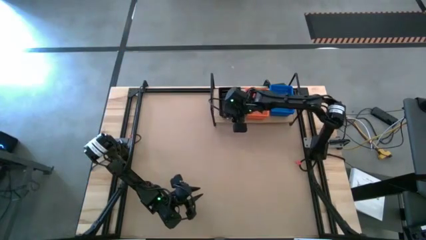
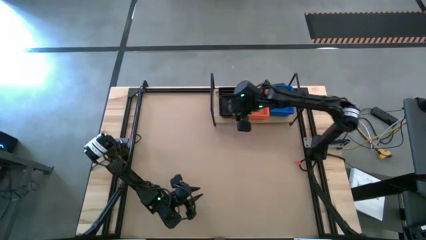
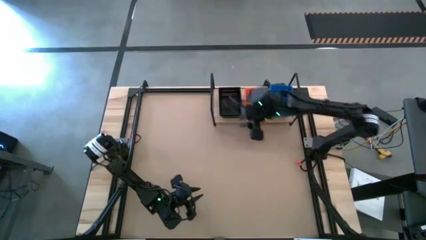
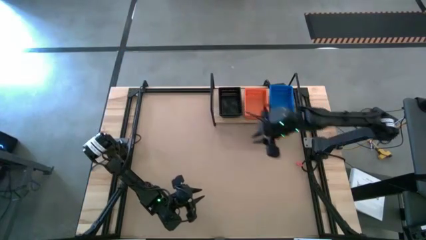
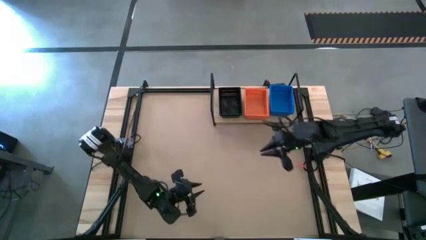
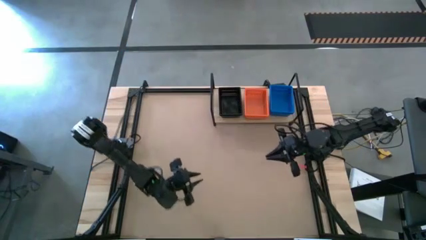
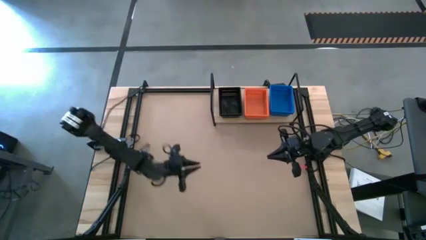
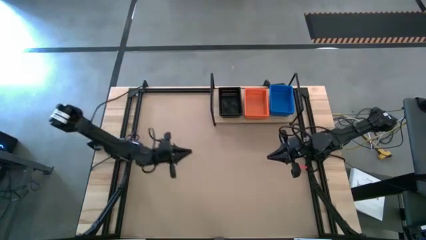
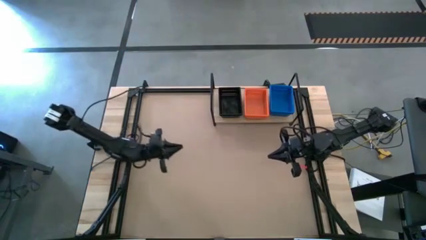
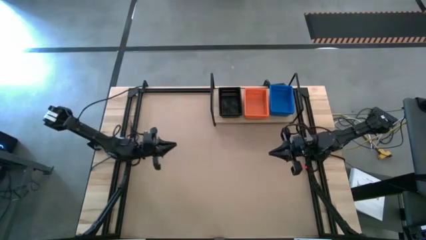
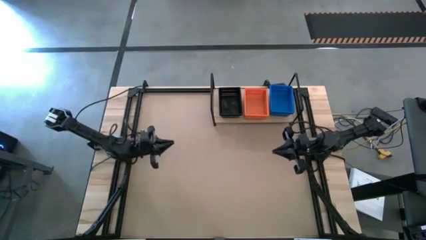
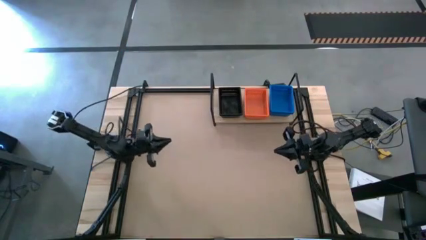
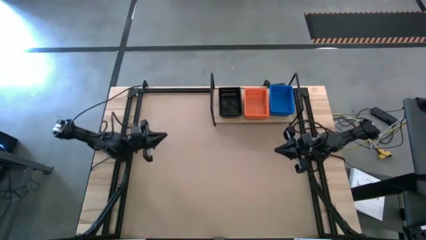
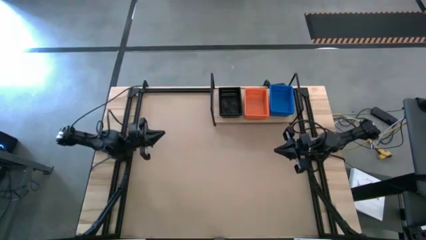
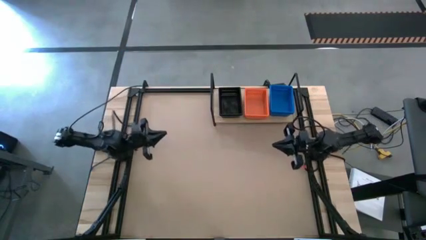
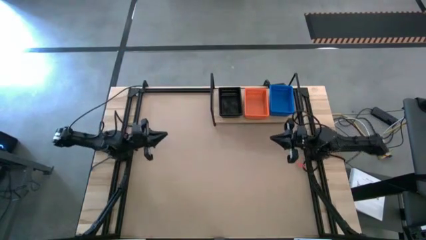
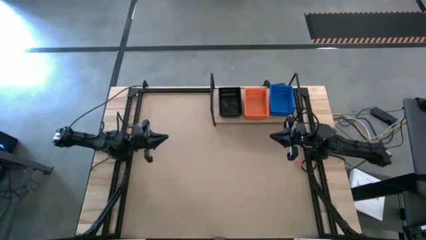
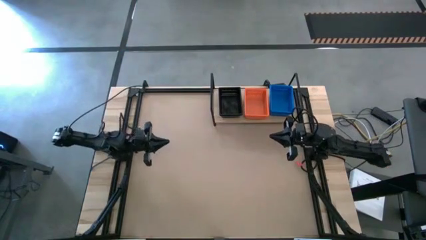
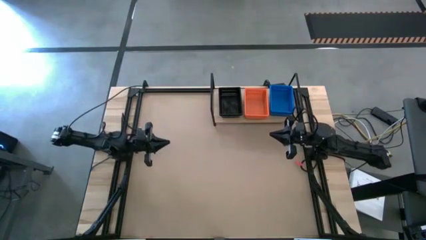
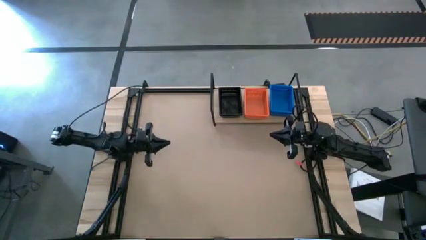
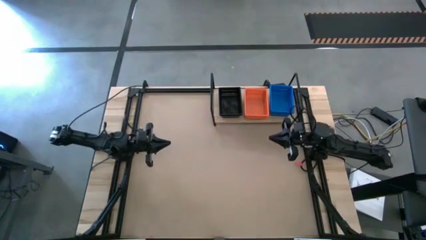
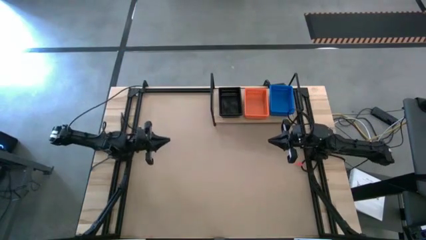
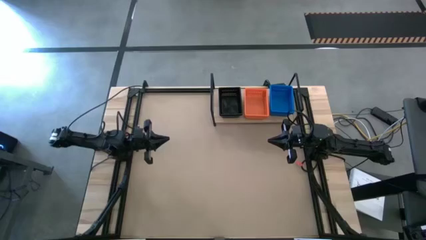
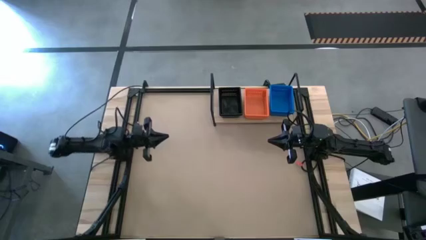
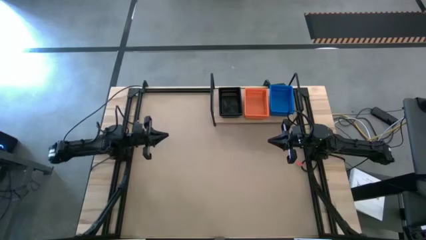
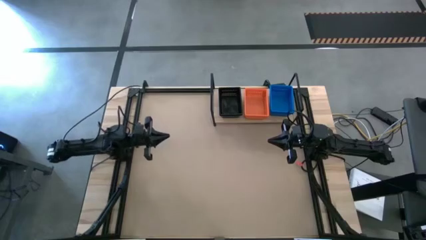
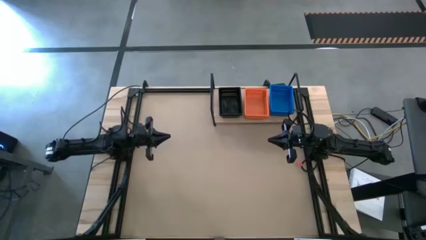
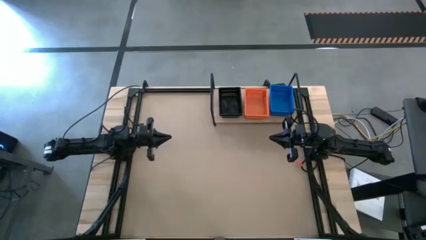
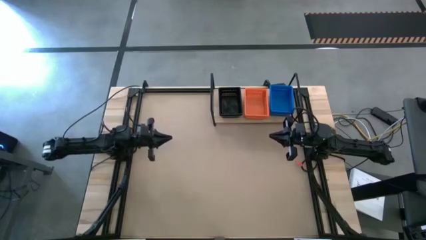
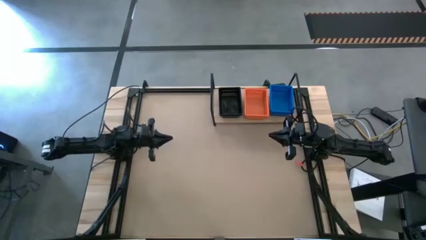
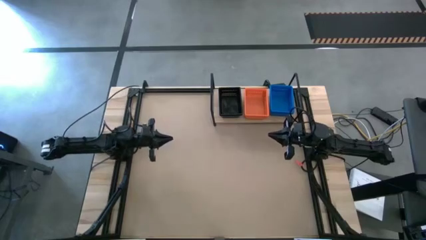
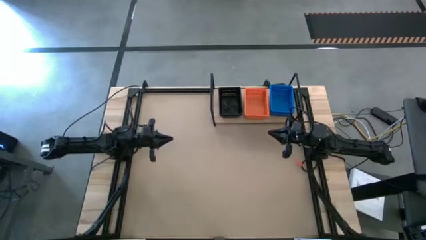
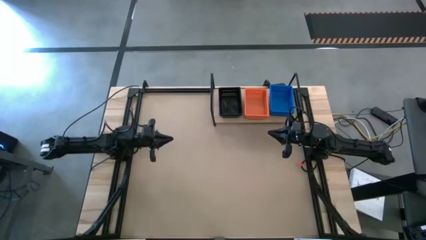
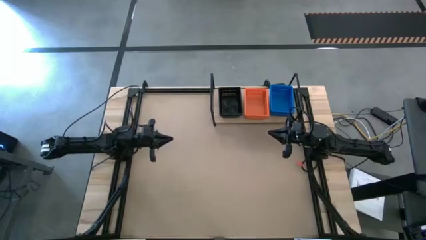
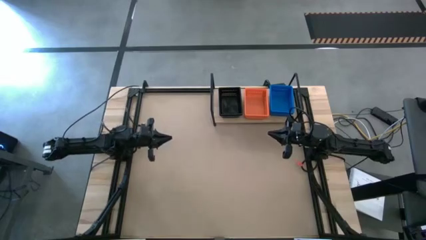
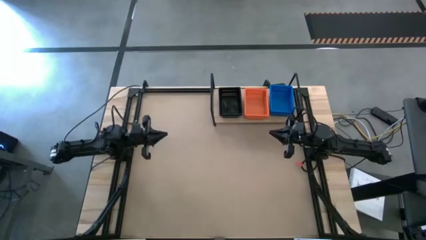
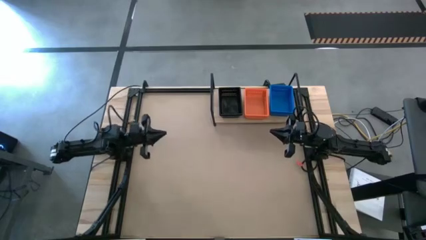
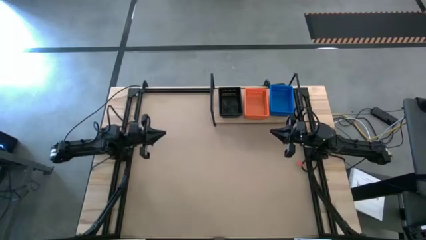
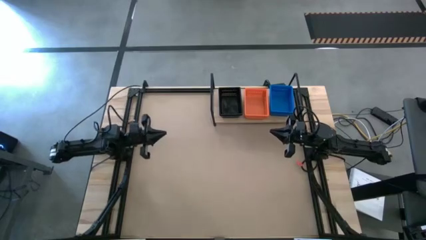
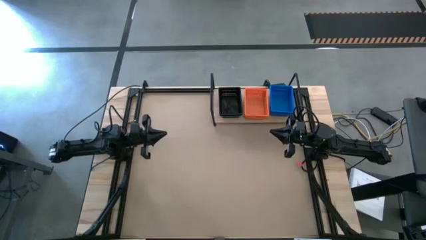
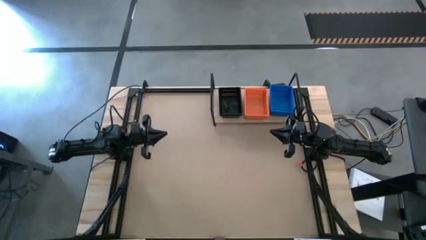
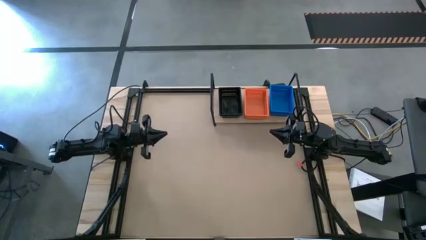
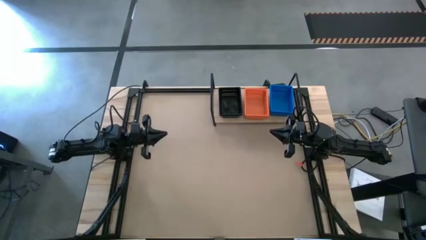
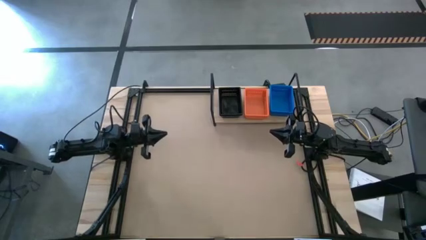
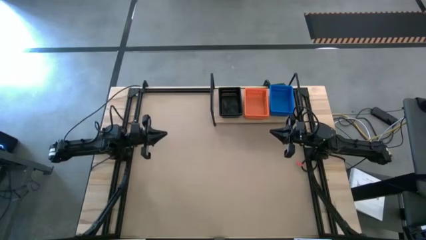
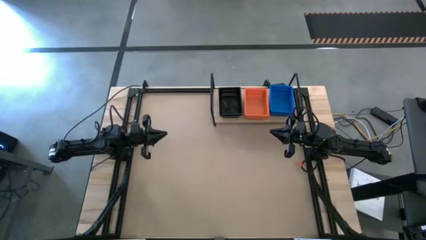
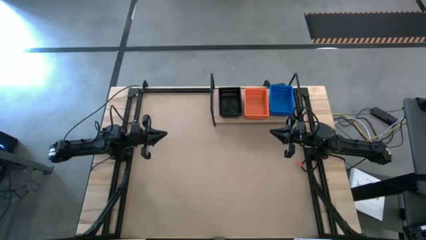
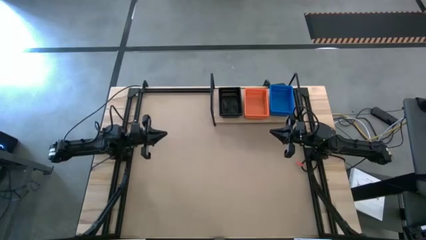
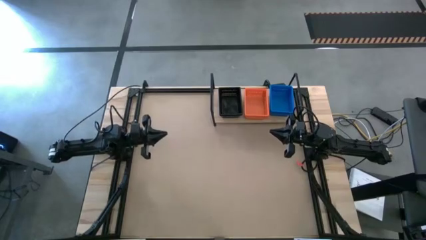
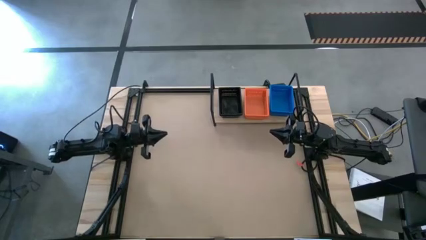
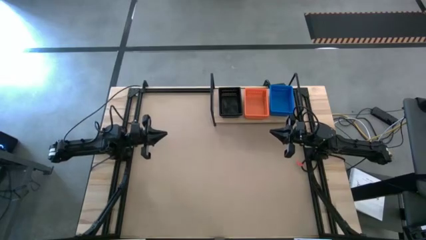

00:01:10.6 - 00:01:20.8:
Task: Stack baskets on shelf by color
Return to Home Position

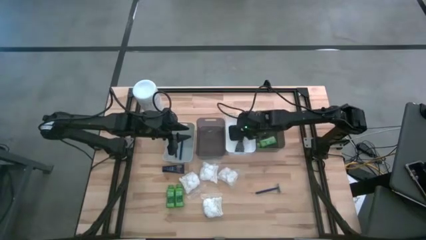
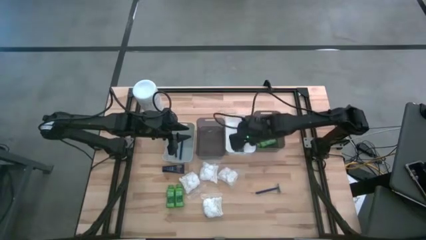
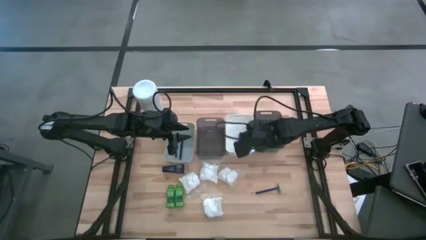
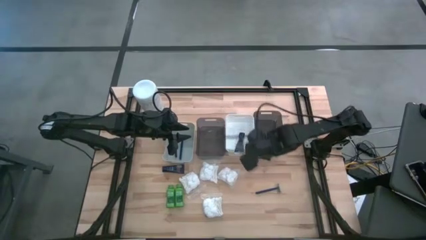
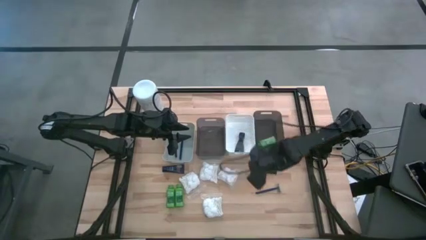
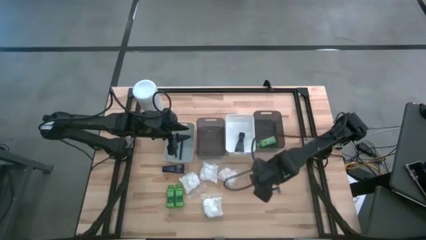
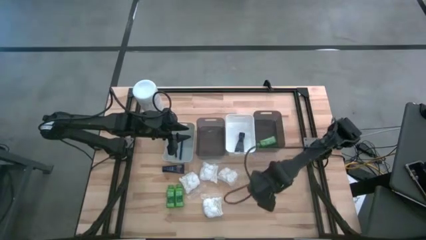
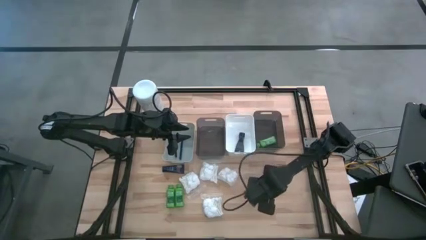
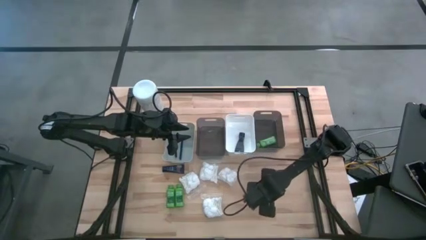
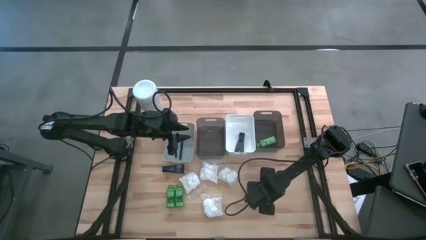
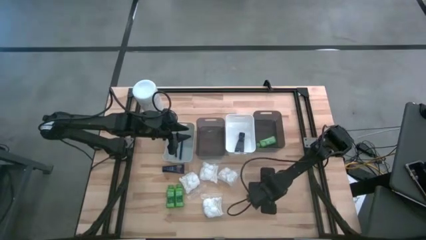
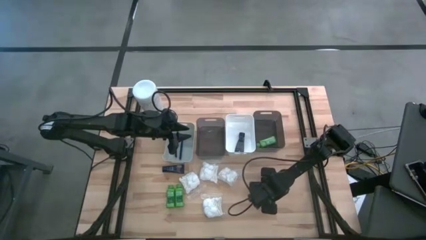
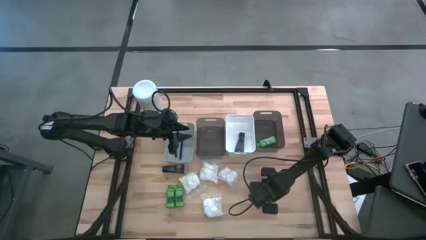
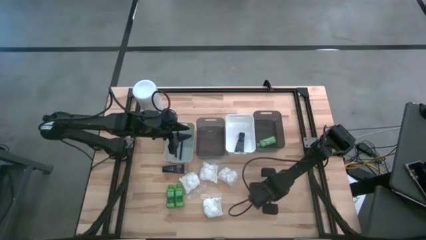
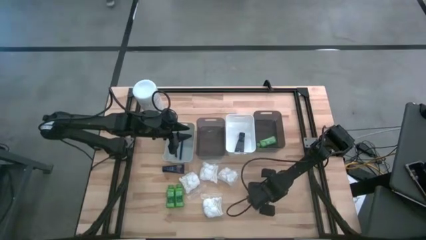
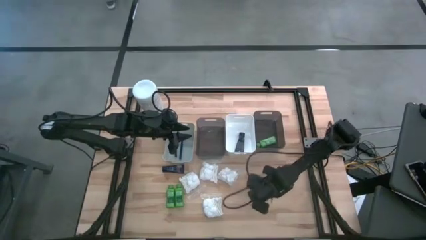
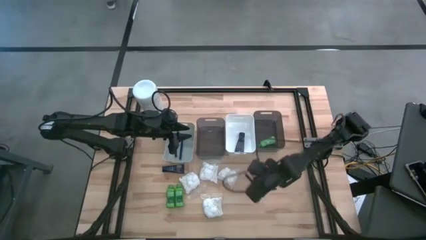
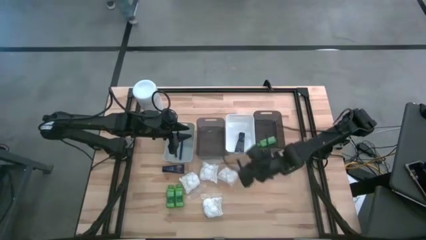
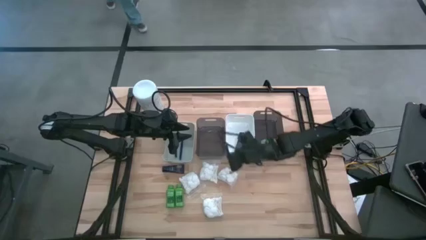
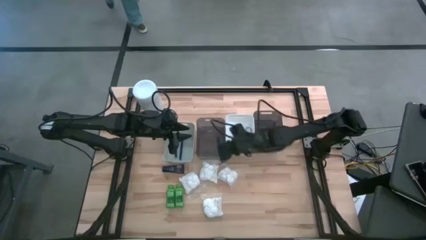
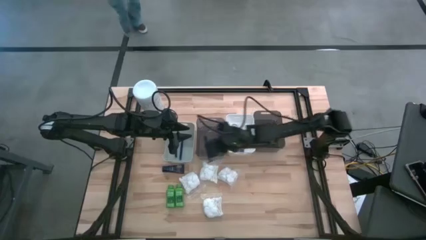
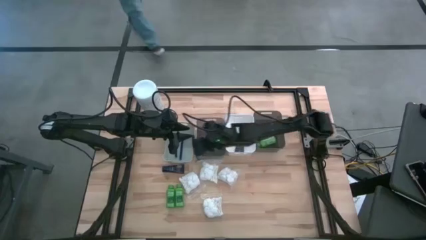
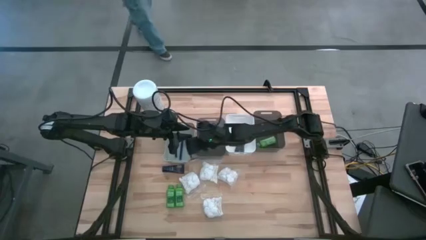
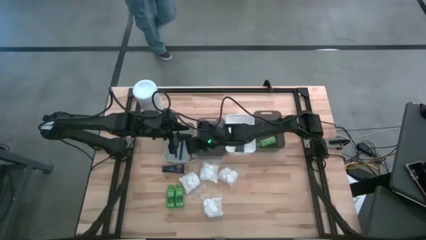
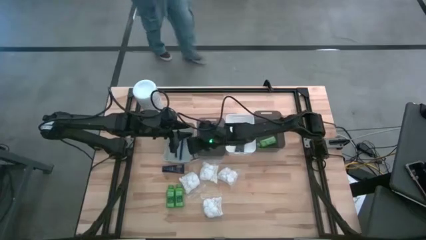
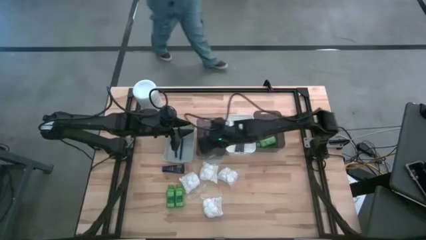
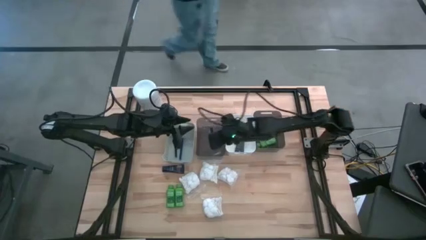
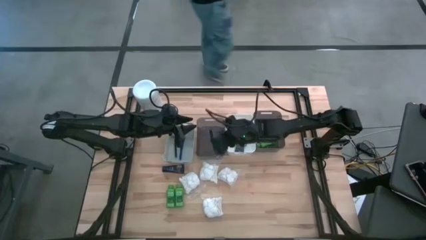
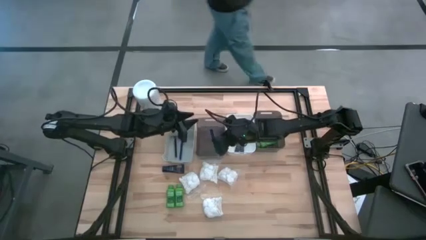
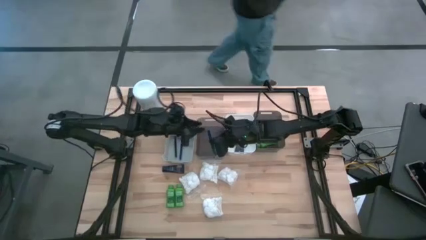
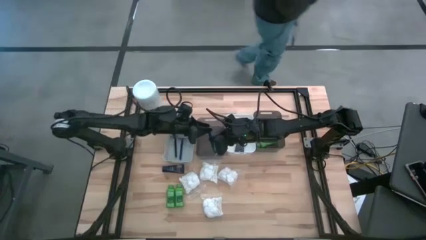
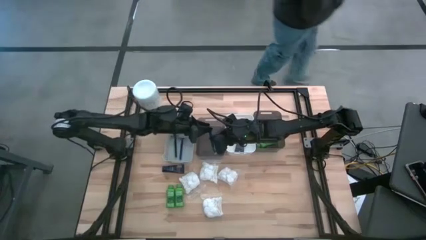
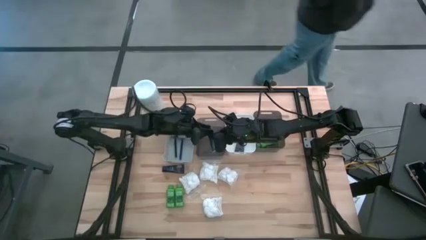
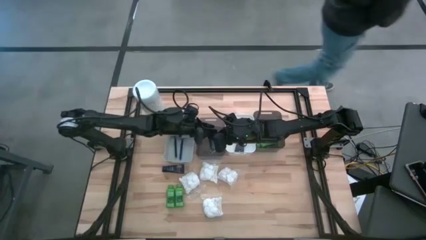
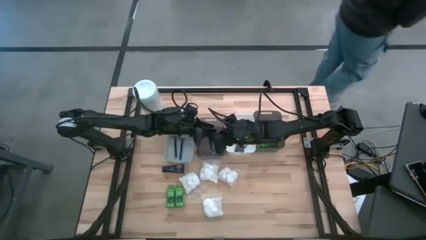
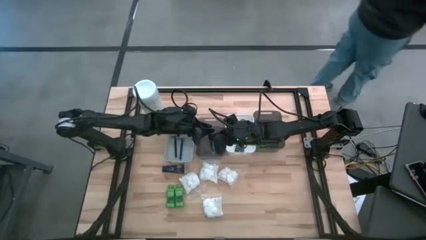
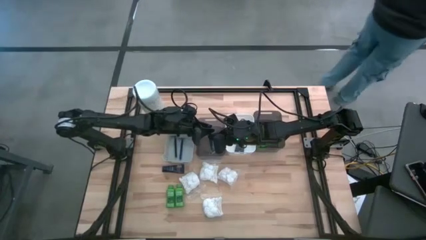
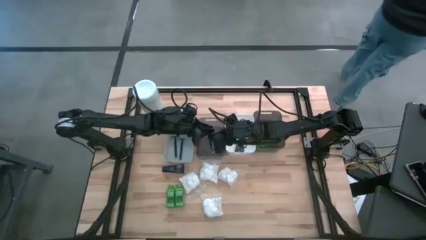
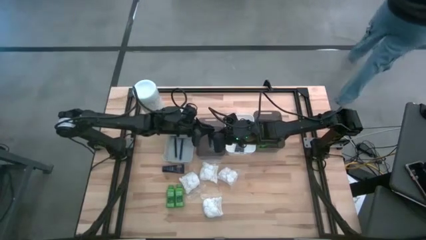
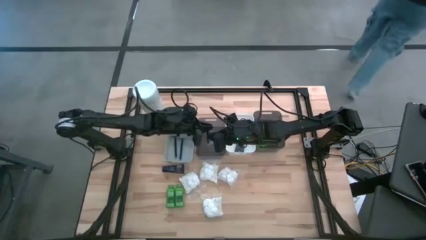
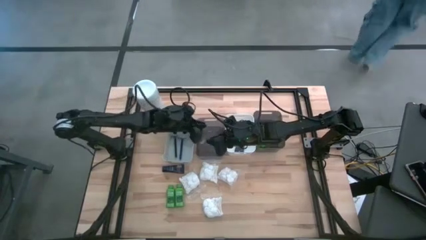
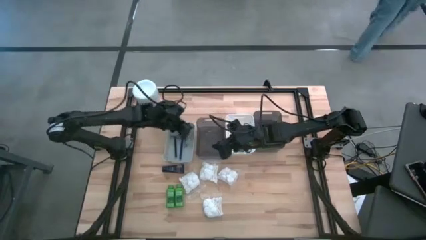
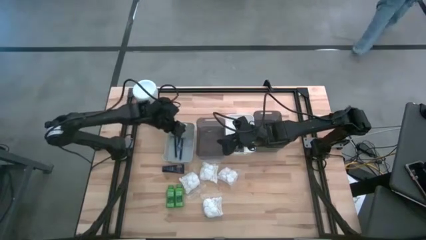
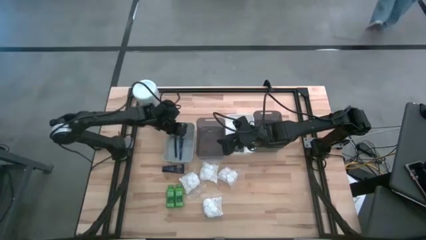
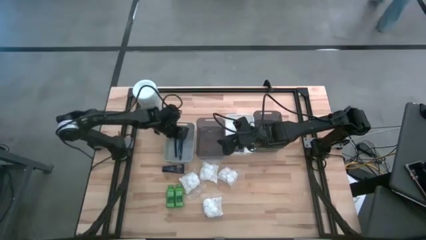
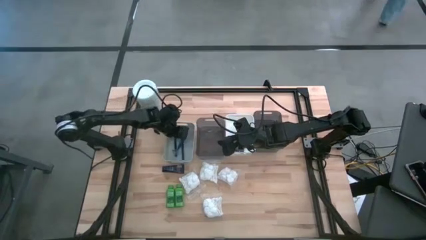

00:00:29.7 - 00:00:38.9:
Task: Pick & Place Travel size toiletries
Put the razor into the gray bin
